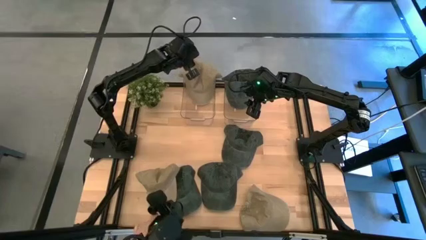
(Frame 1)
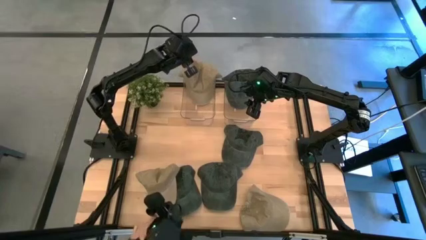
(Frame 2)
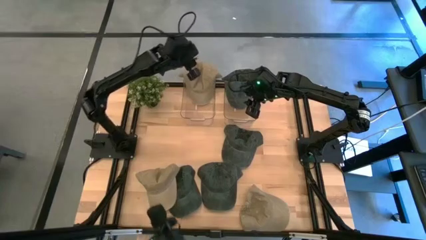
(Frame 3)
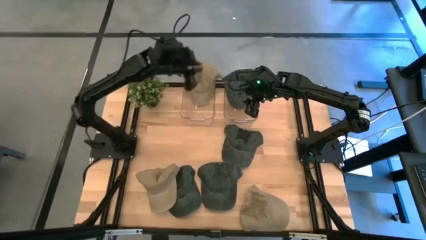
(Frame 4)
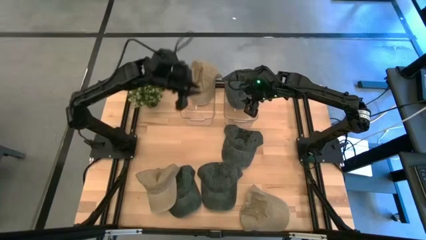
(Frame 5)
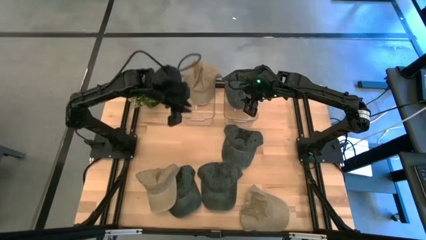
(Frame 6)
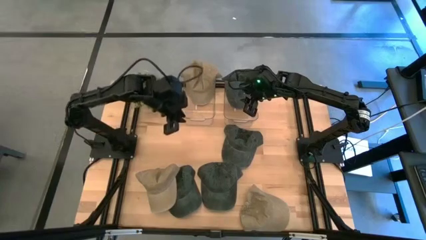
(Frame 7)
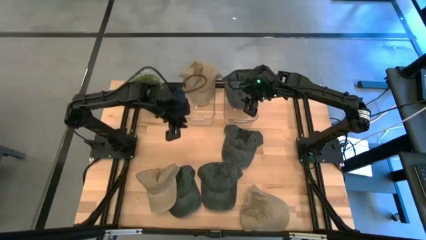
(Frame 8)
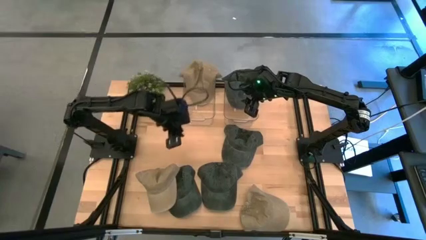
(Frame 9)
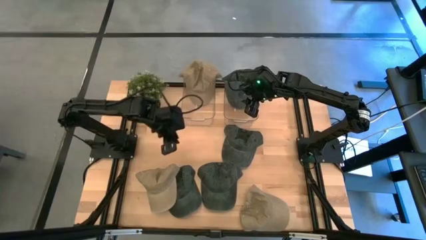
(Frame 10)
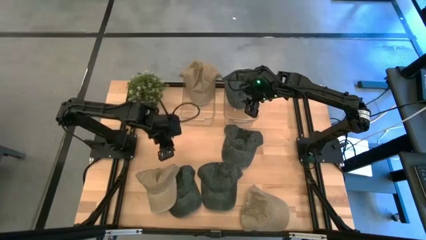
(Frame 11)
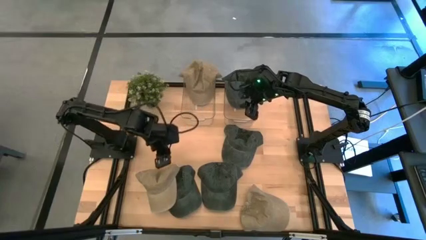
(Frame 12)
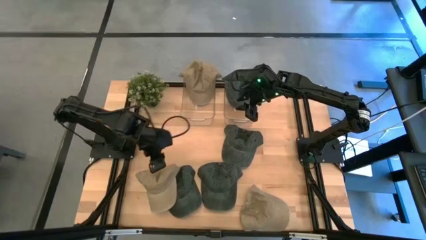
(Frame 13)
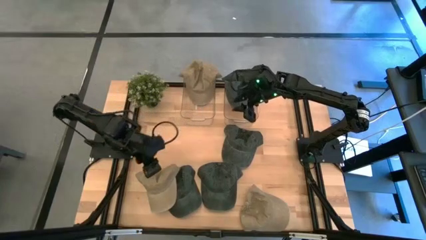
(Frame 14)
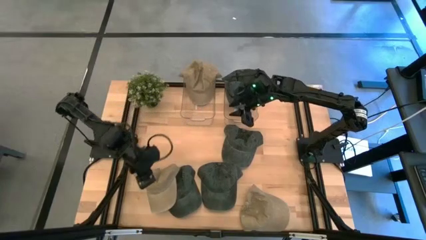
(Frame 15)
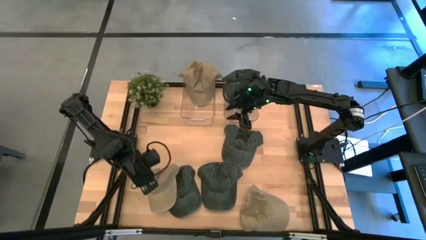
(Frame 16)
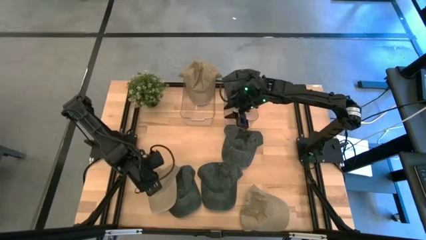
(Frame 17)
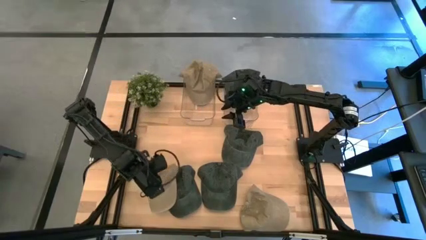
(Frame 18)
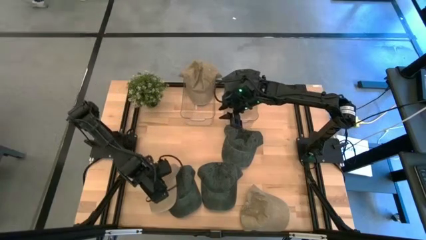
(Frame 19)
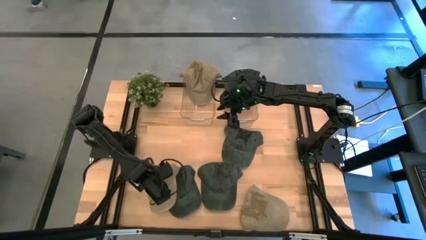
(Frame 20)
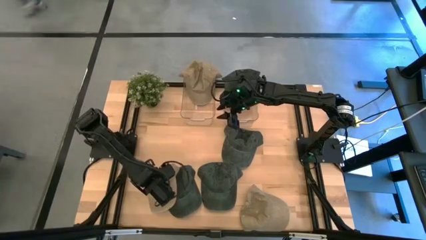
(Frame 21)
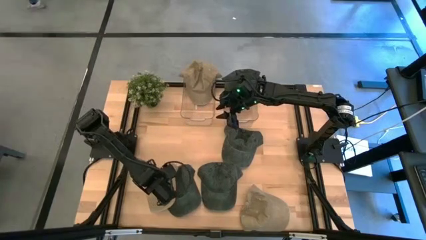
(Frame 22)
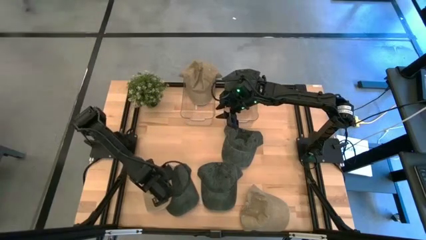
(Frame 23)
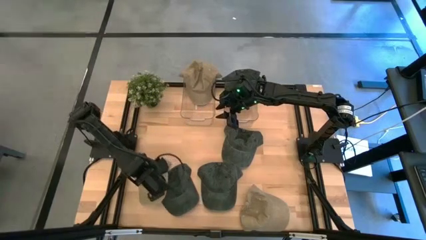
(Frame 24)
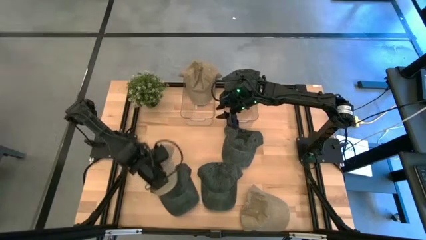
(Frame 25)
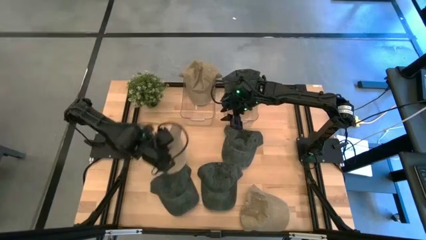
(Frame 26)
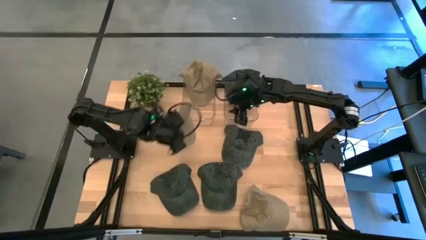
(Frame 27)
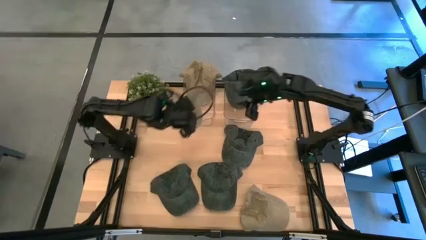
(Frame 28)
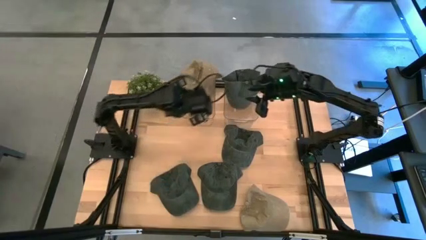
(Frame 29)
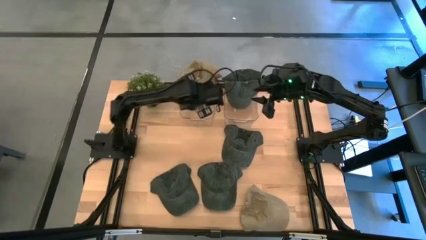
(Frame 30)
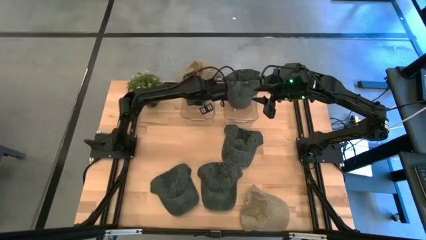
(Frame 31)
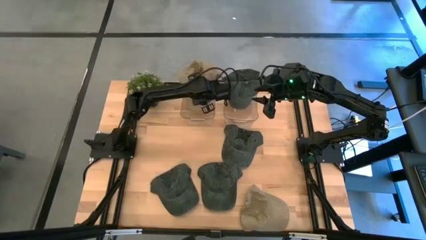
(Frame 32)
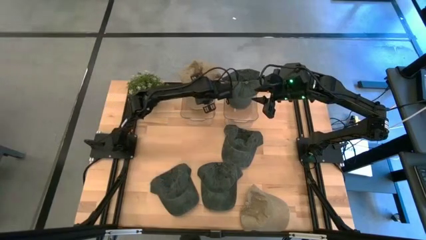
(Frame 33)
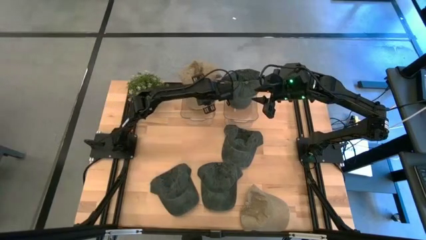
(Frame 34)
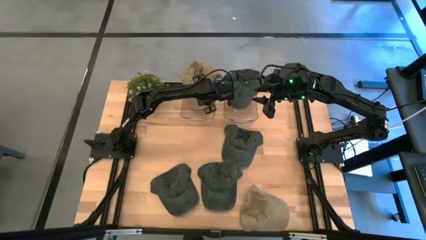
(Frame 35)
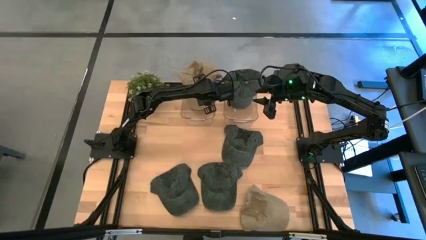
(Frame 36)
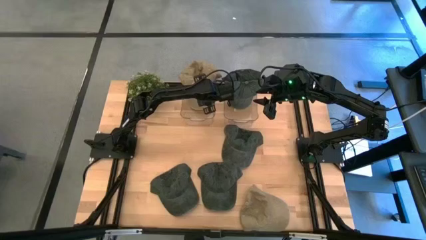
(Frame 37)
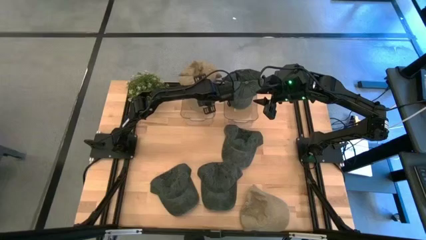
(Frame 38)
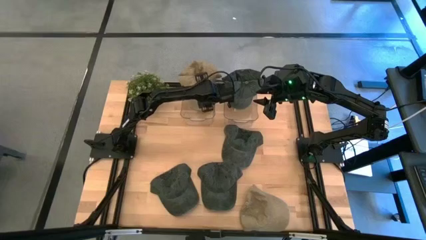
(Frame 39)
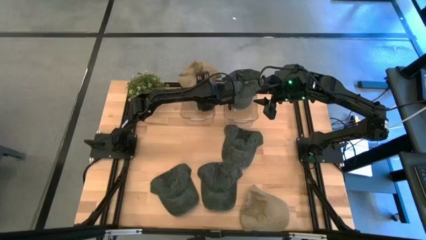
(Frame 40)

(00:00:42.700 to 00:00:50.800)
Task: Pick & Place hat
Put the brown cap into the left transparent bin

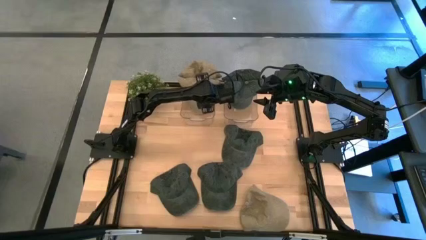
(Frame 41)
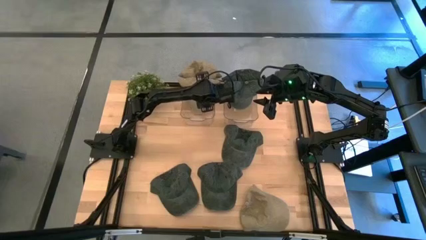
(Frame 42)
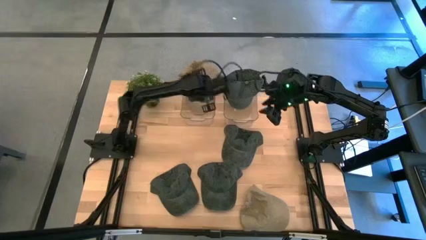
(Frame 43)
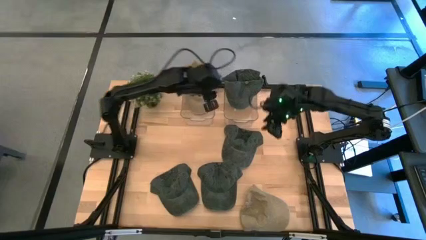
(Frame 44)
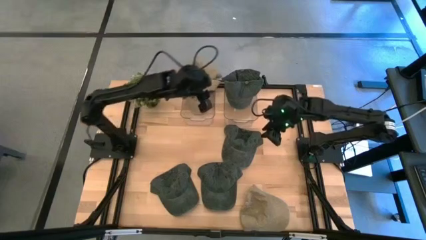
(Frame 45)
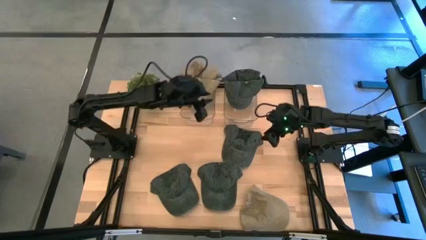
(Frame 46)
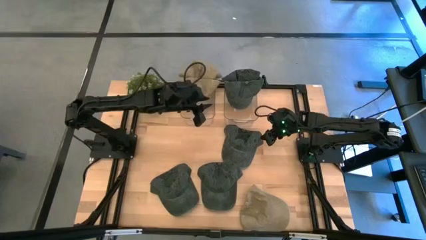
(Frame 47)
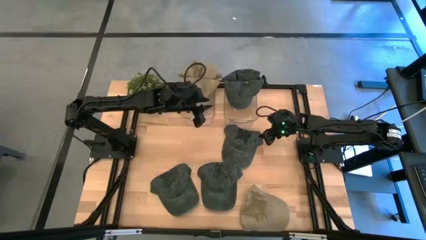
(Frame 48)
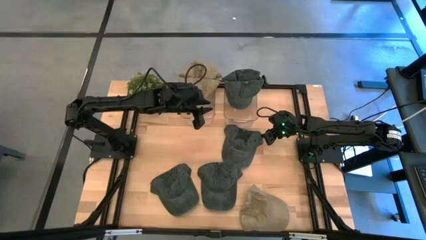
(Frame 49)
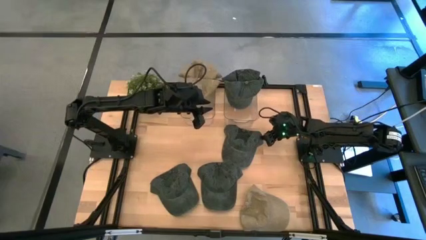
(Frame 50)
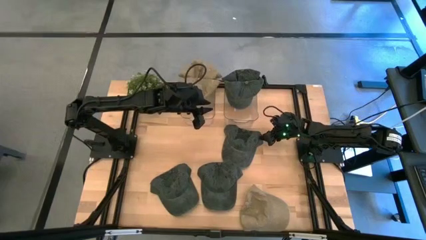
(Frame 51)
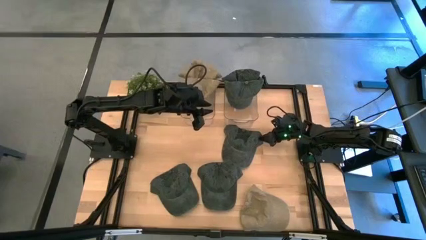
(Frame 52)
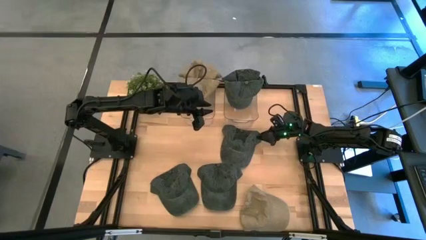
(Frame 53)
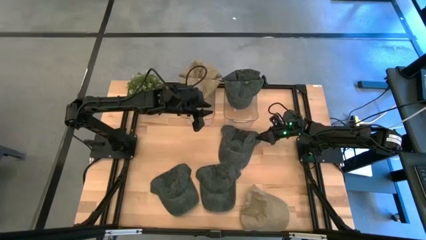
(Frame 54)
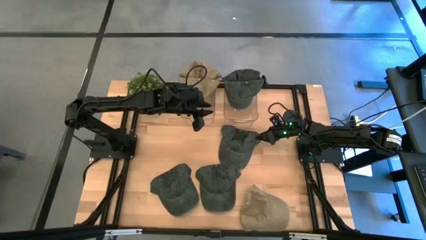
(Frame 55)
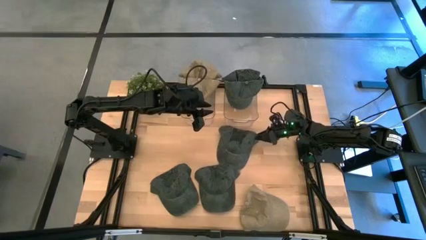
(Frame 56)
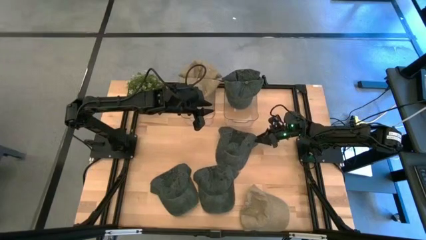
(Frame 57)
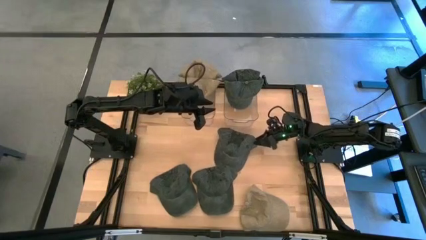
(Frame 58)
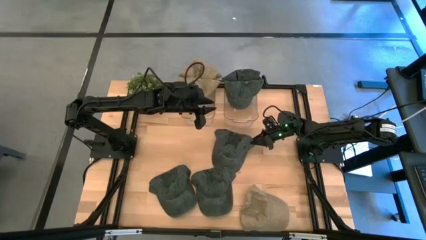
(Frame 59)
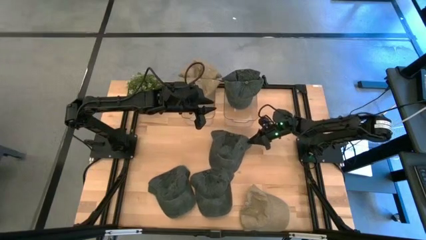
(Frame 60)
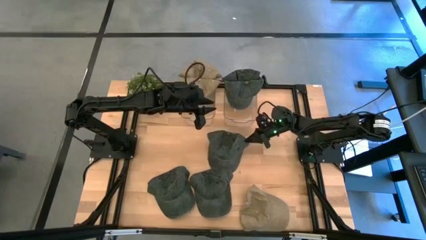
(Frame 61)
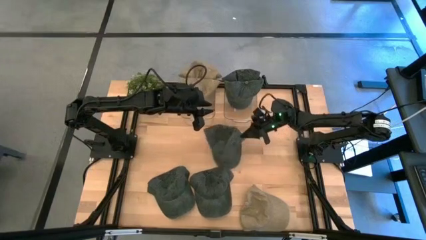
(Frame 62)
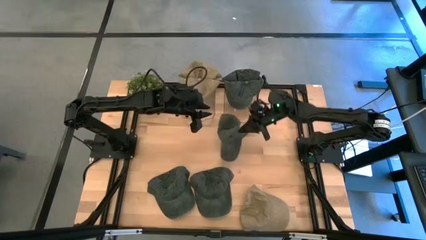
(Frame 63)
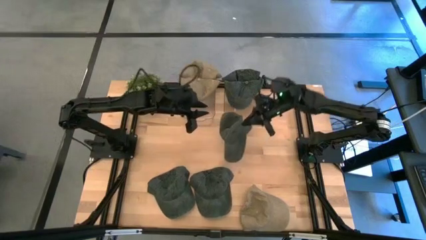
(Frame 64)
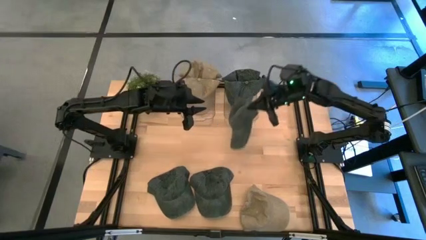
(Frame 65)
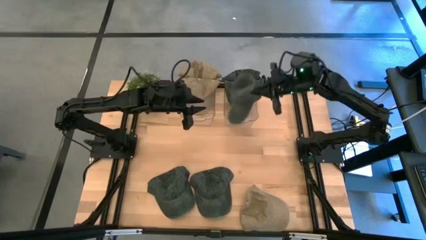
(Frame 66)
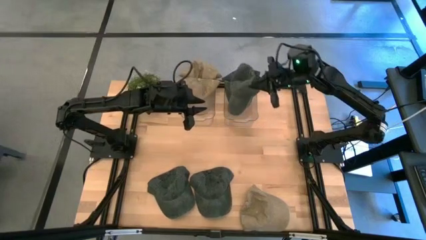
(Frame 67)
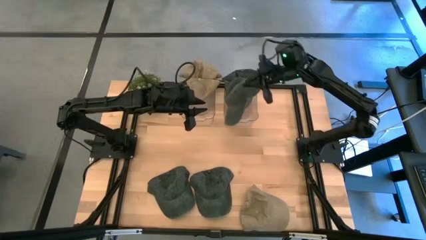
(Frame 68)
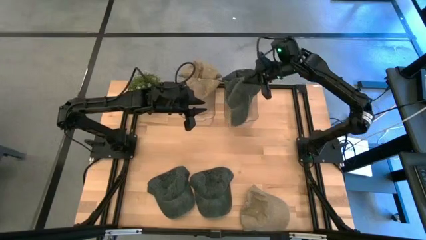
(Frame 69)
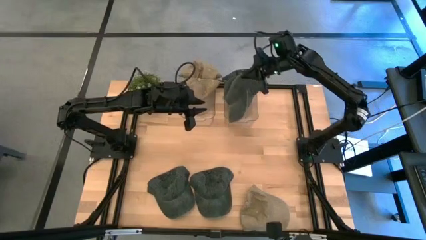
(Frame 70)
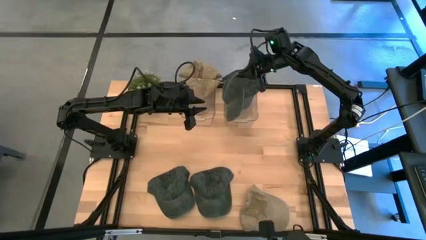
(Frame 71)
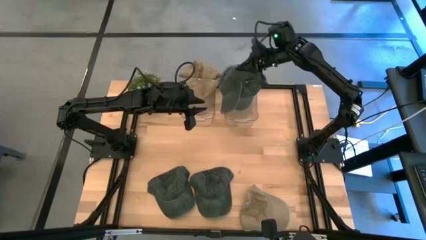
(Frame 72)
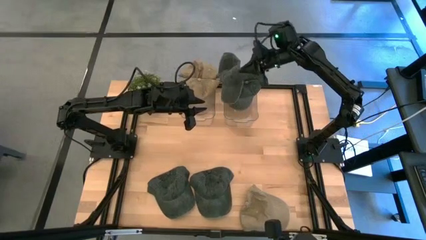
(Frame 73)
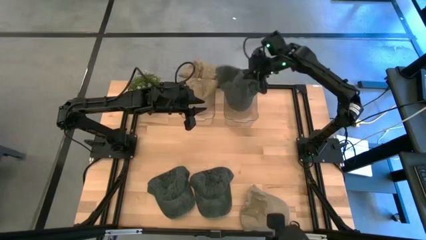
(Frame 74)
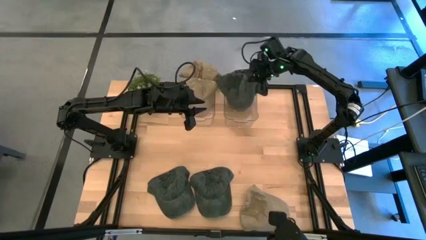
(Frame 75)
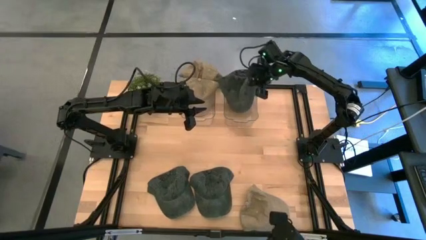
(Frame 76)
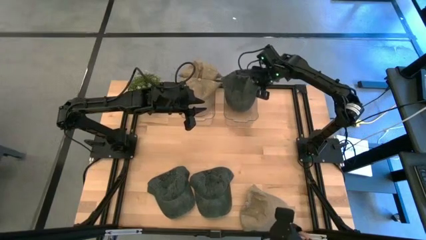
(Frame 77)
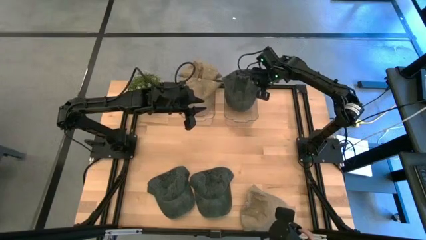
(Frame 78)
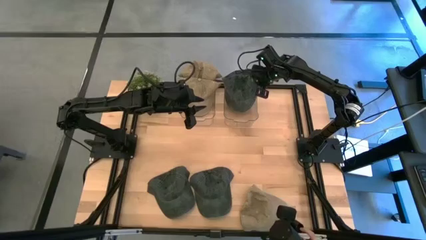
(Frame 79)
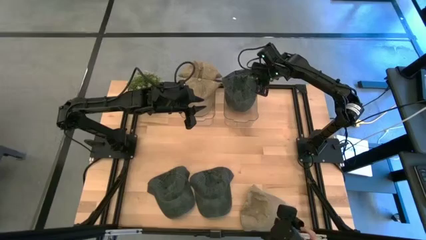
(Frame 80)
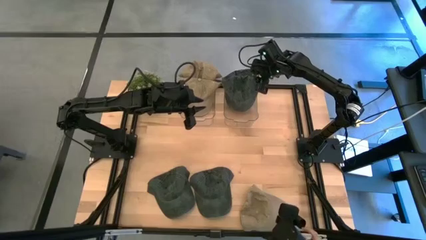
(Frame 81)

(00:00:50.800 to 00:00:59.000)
Put the black cap into the right transparent bin

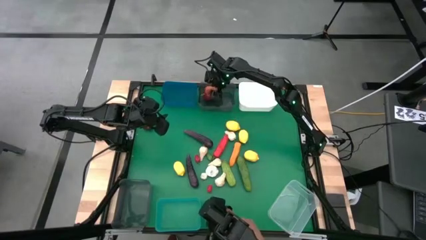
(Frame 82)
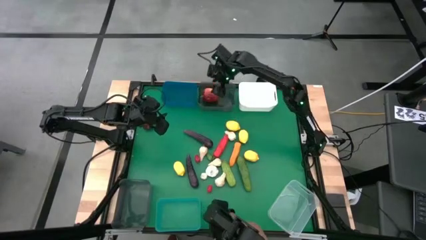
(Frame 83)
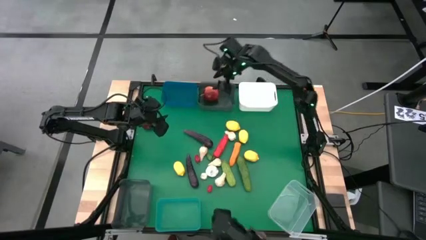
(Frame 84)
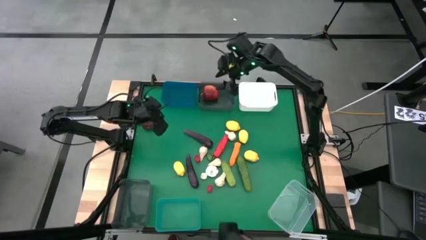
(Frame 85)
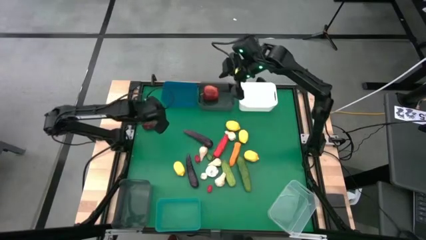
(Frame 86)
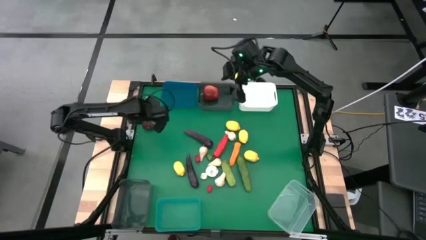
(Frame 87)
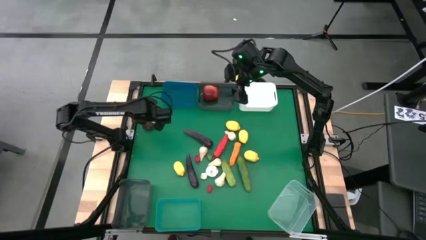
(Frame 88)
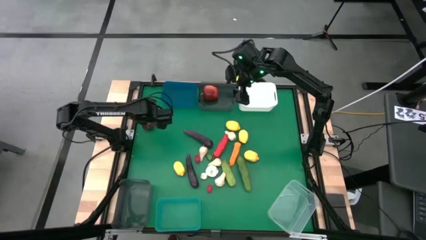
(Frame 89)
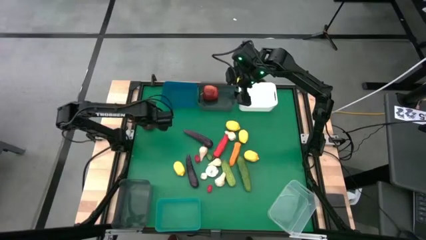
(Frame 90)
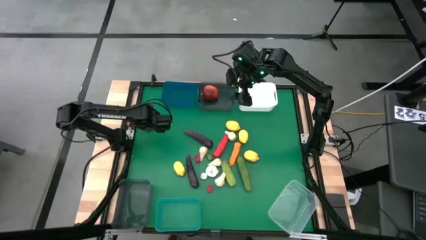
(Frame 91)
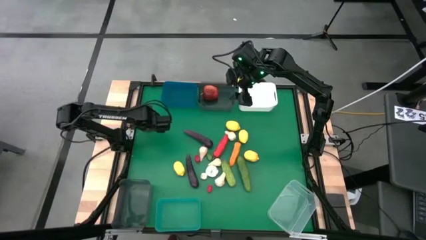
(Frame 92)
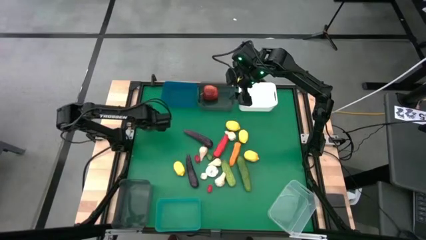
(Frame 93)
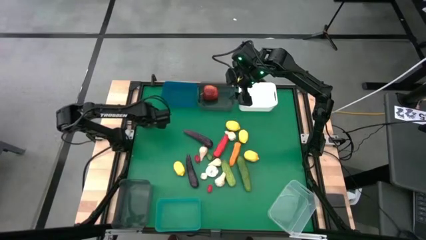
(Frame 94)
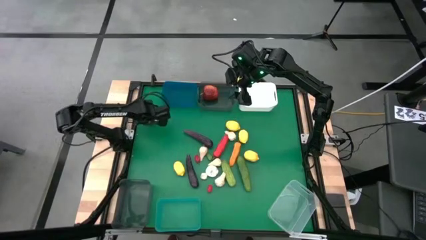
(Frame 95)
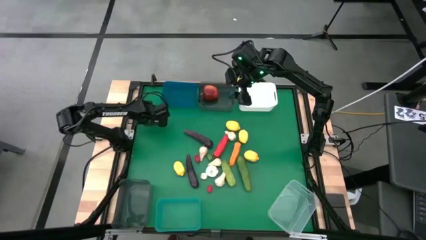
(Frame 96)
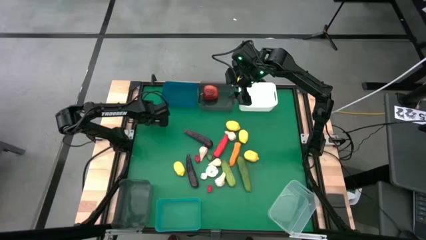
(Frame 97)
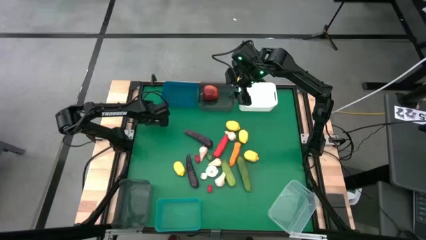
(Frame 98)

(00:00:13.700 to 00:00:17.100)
Task: Sort produce into baskets
Put the red apple into the top black bin
